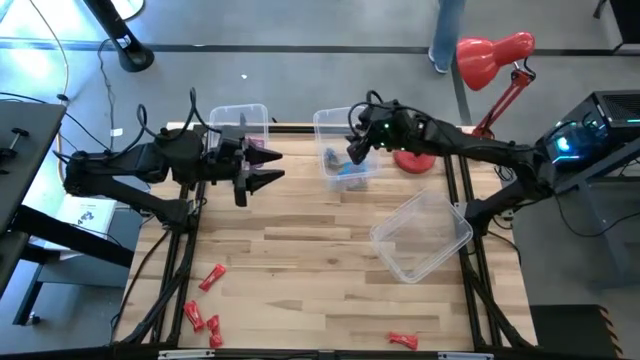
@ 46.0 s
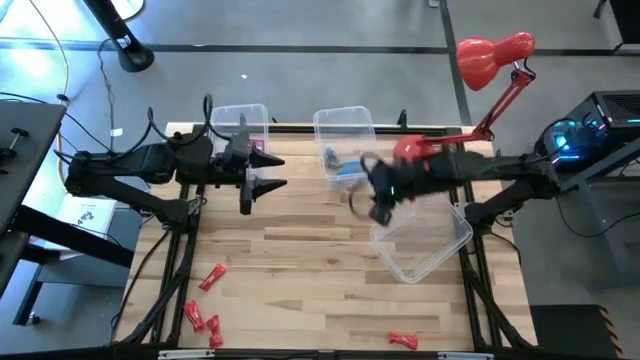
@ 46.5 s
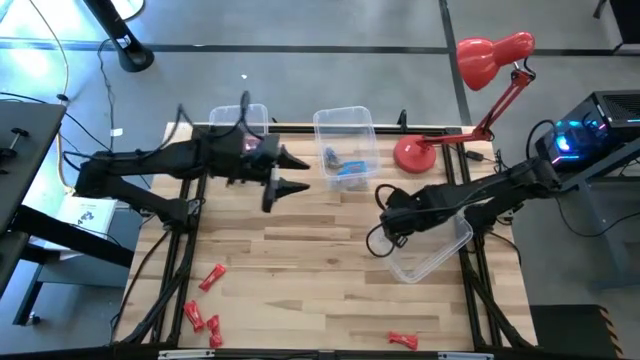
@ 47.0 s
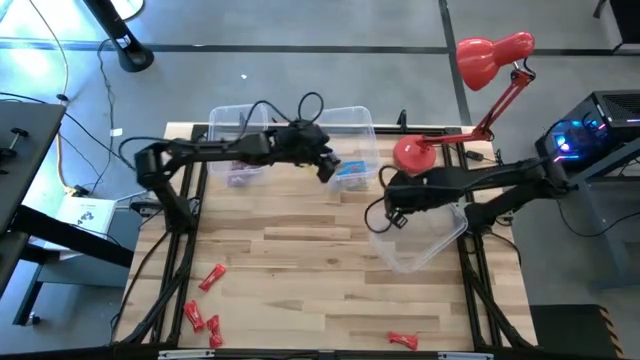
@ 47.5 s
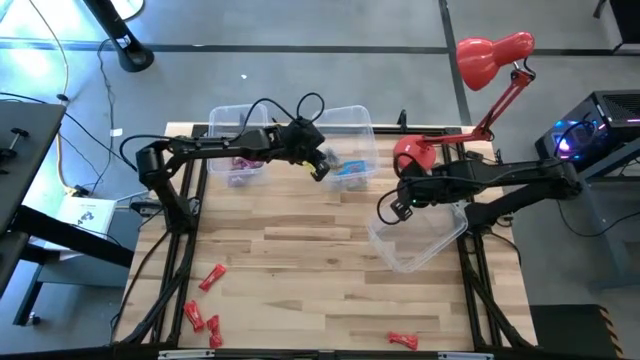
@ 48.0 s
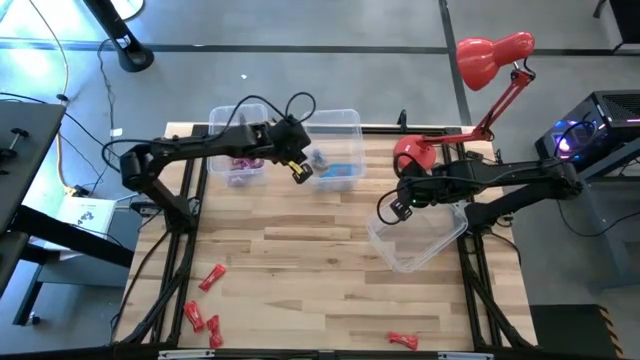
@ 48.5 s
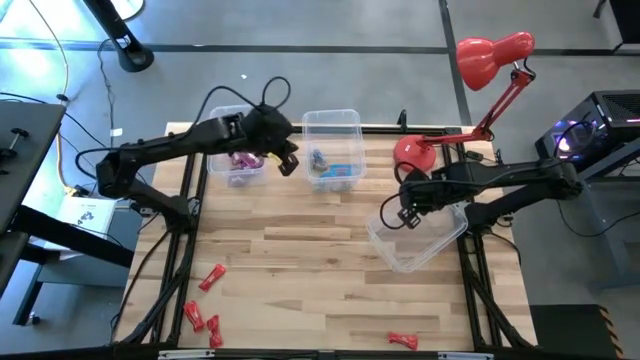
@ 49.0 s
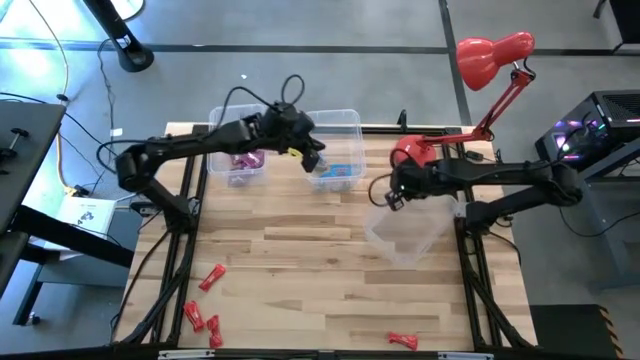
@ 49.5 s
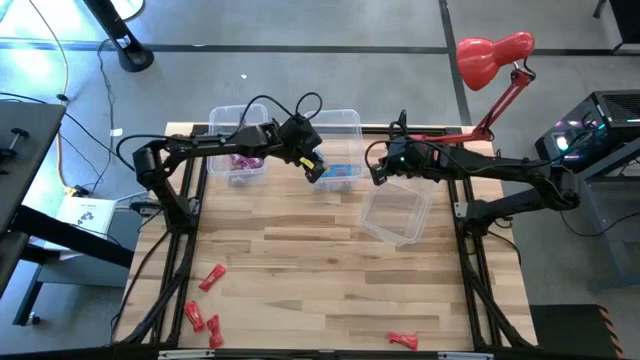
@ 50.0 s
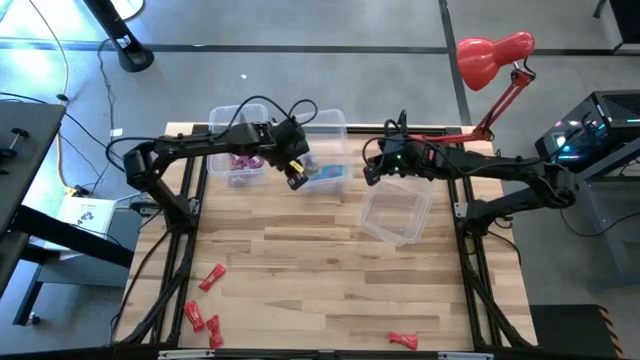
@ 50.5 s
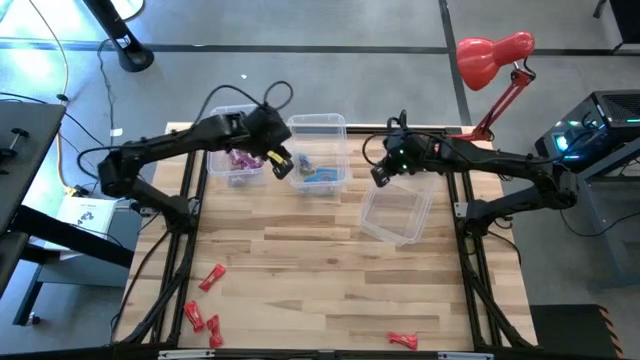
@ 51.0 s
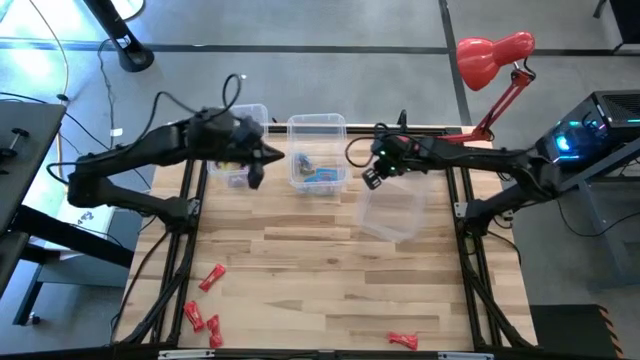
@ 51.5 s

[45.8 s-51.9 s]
Task: Sort candy
Adjust the transparent bins

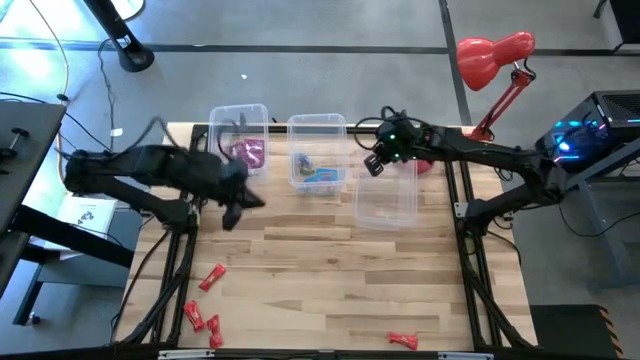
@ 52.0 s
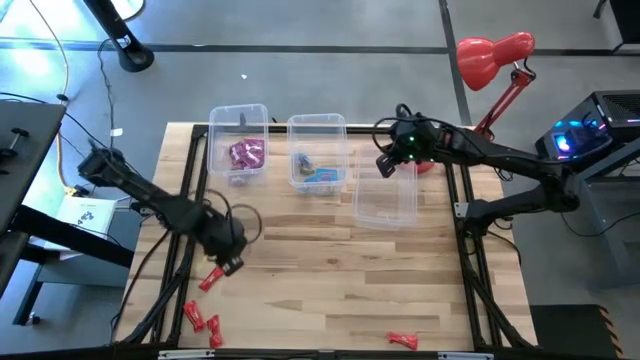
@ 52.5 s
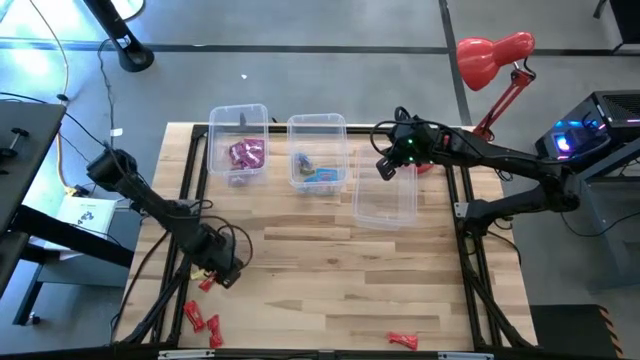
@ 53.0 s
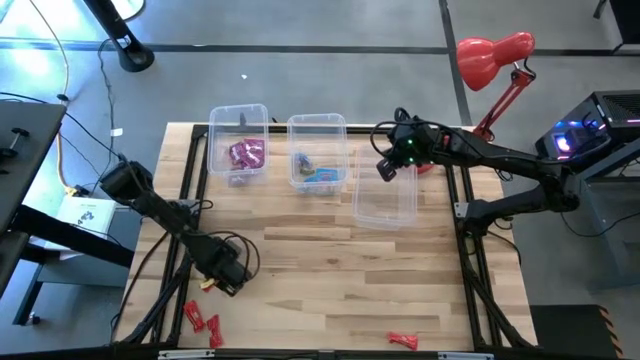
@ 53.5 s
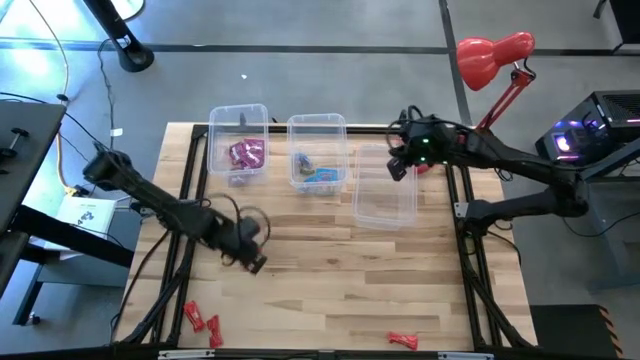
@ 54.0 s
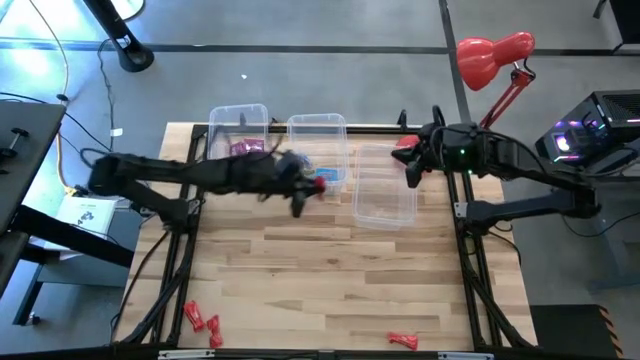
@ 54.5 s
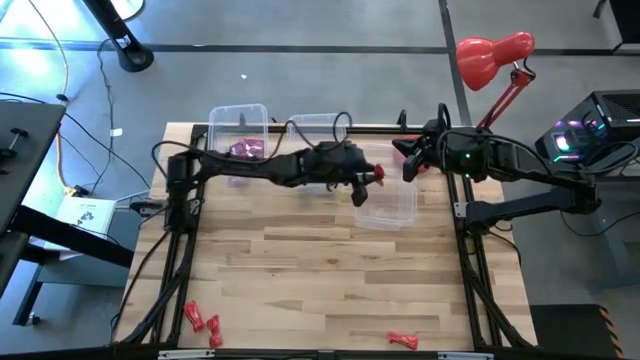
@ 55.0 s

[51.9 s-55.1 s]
Put the red chocolate into the right transparent bin

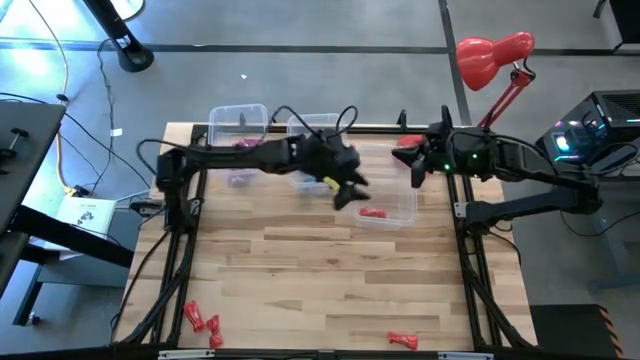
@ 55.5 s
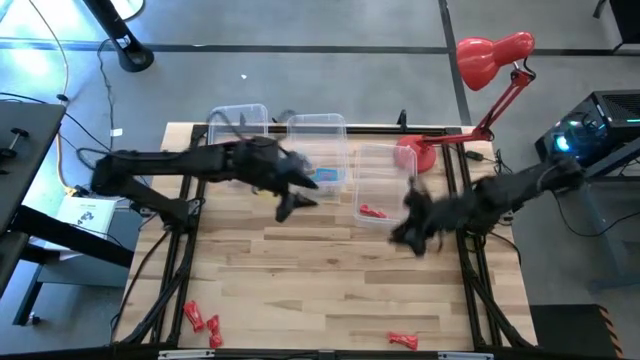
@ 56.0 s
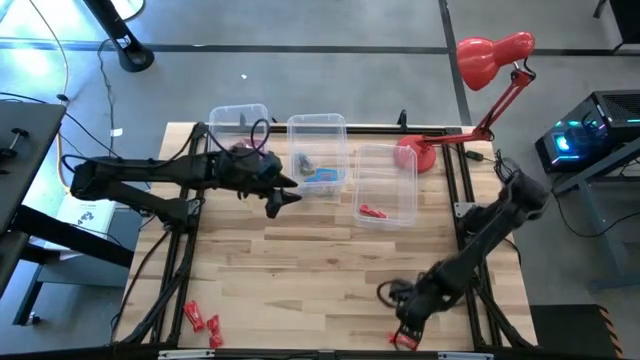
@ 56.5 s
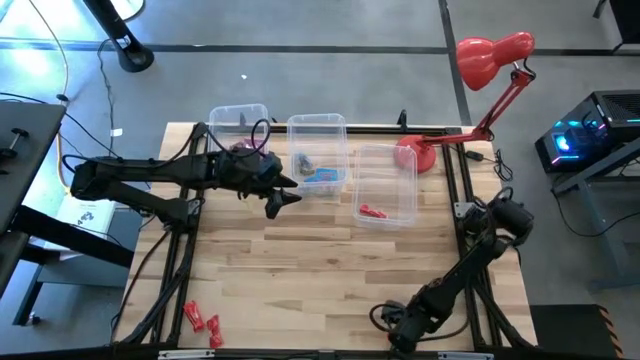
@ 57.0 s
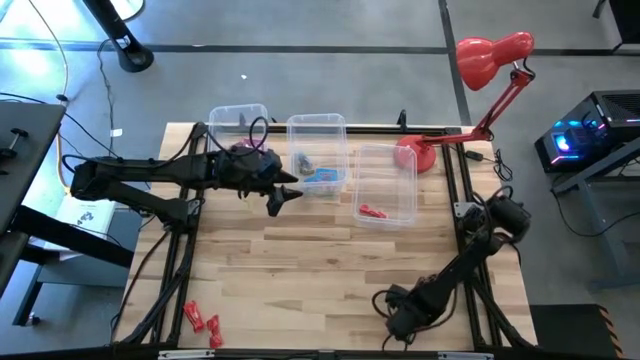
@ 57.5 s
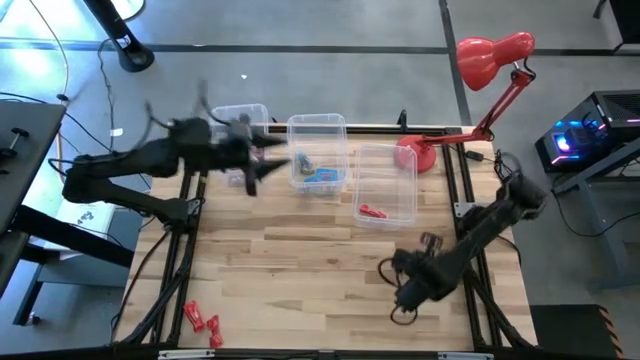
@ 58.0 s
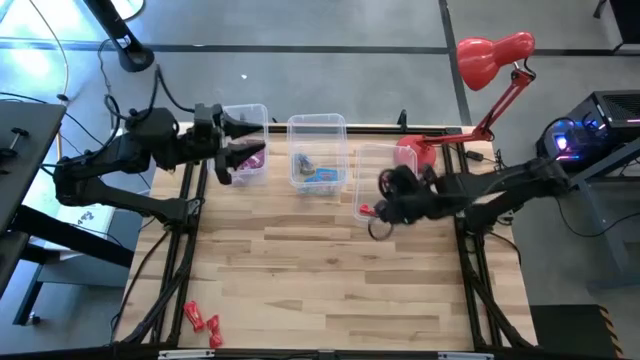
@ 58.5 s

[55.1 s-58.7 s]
Put the red chocolate into the right transparent bin

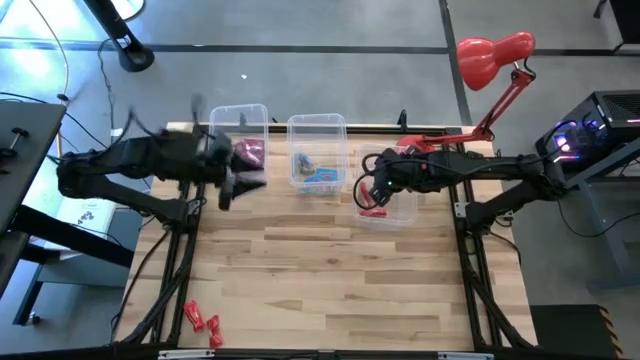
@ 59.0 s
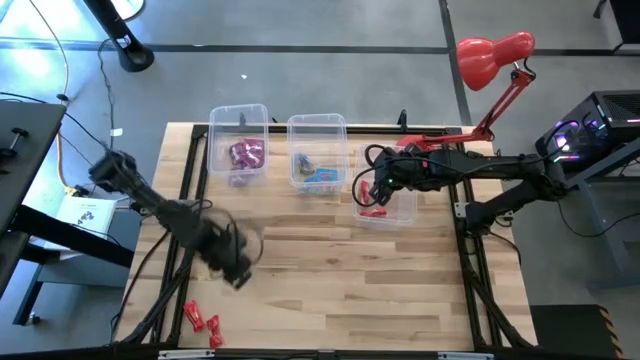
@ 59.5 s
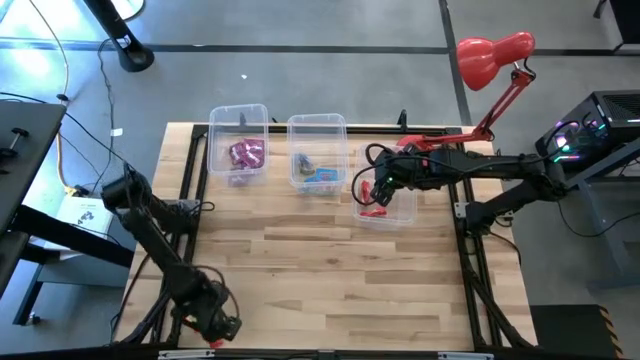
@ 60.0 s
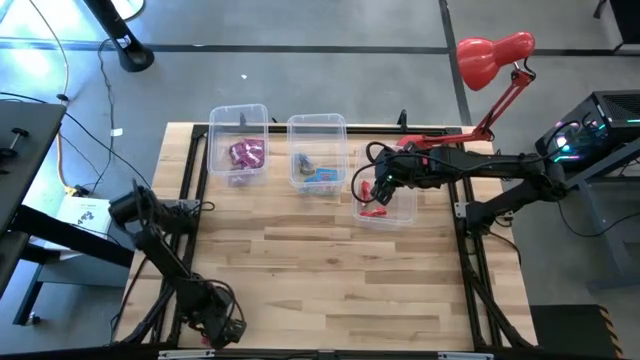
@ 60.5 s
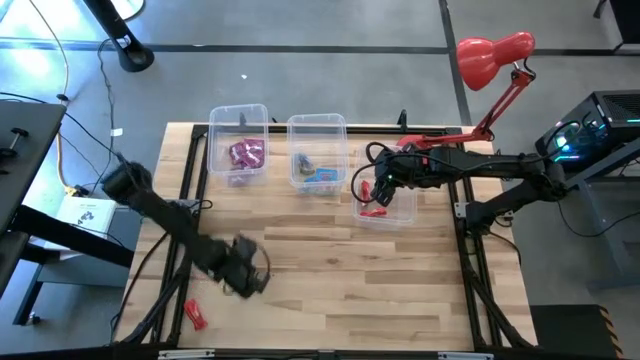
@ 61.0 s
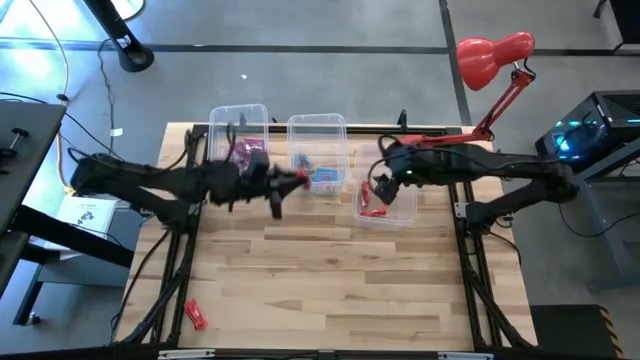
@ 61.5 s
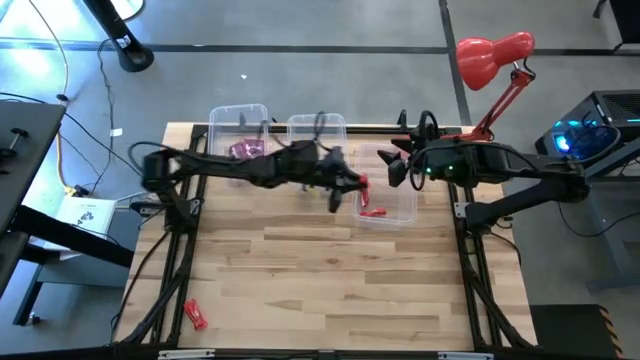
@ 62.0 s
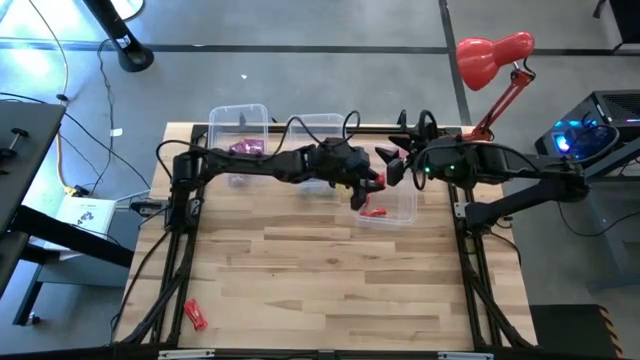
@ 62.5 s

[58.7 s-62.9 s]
Put the red chocolate into the right transparent bin

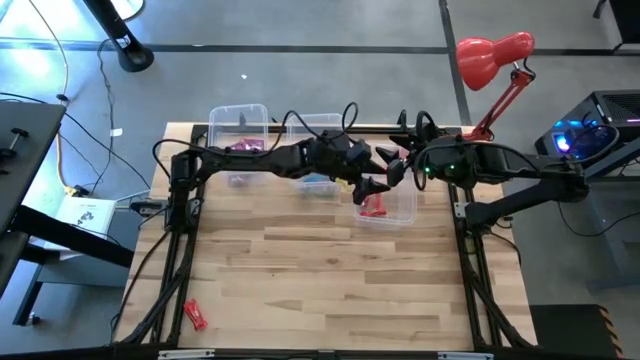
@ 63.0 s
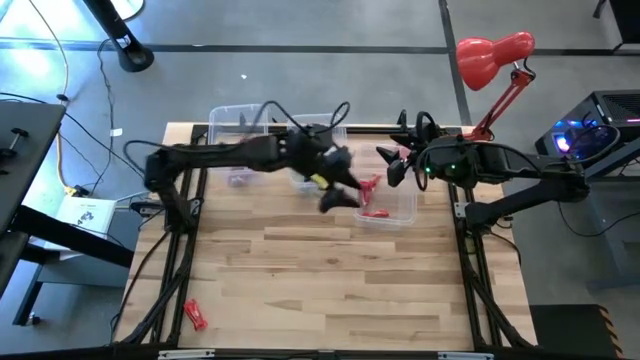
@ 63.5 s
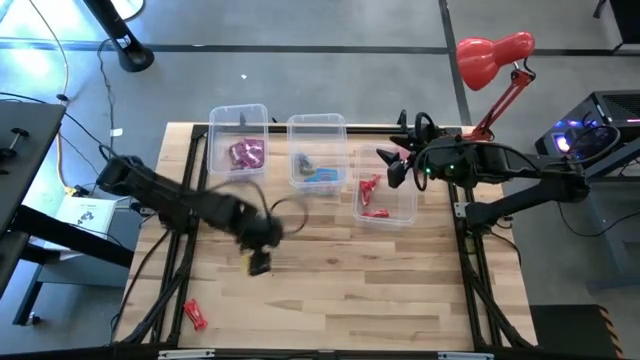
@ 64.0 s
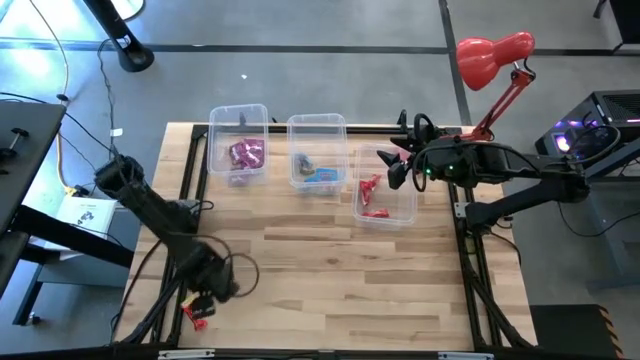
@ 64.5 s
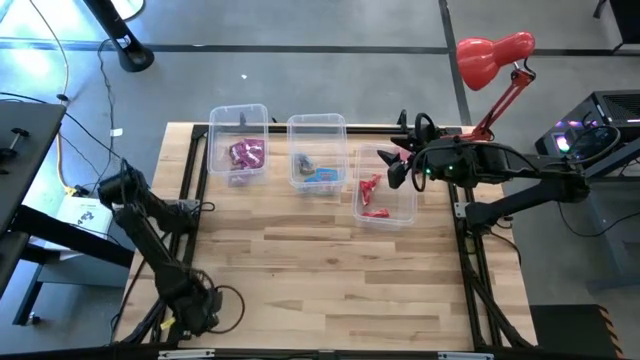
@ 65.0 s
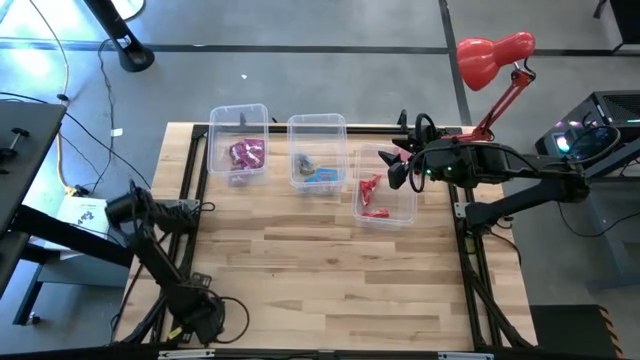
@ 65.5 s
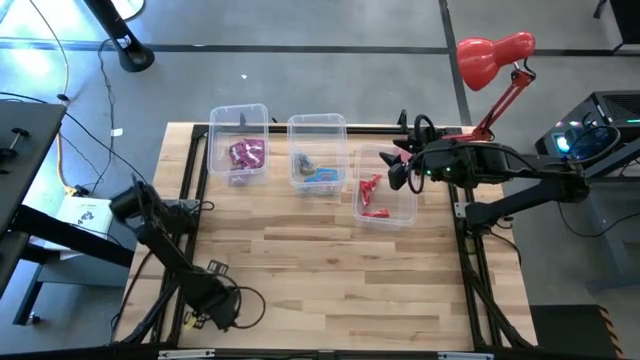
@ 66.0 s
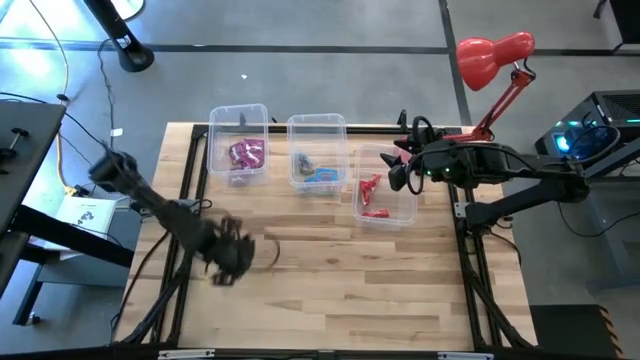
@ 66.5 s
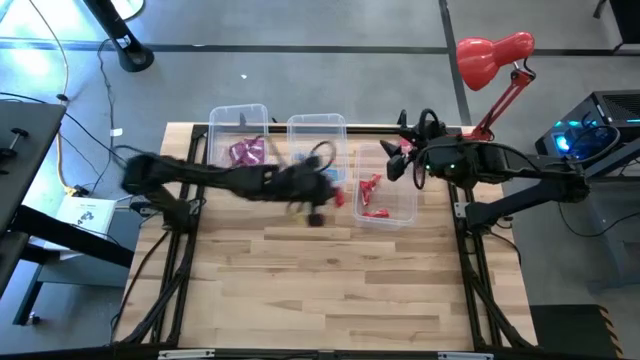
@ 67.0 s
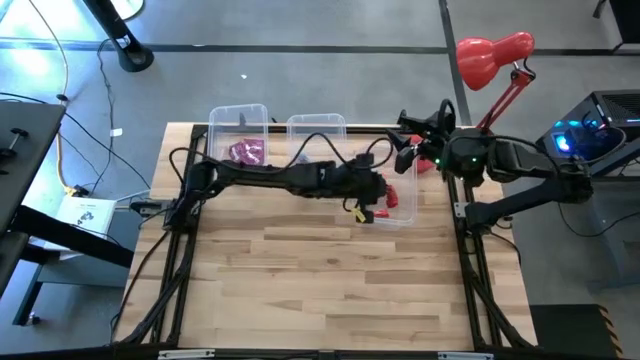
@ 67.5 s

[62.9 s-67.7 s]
Put the red chocolate into the right transparent bin
